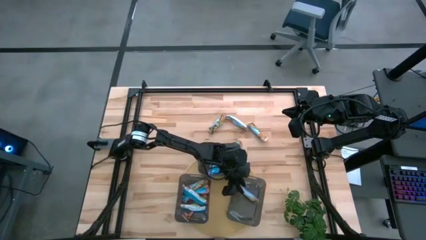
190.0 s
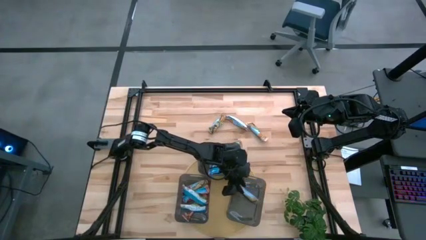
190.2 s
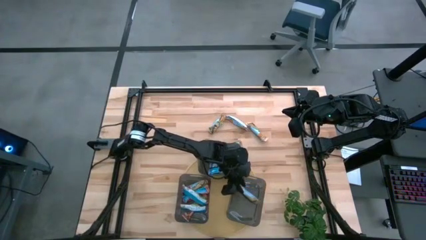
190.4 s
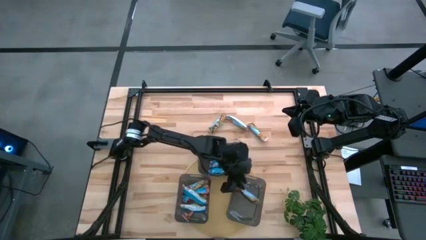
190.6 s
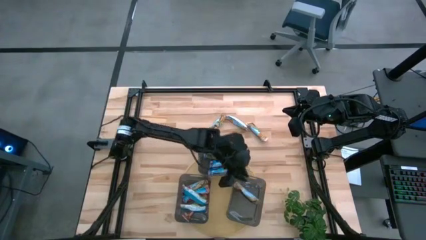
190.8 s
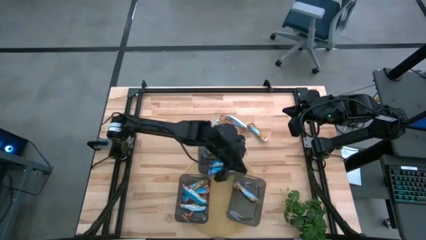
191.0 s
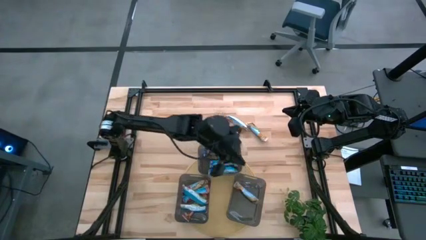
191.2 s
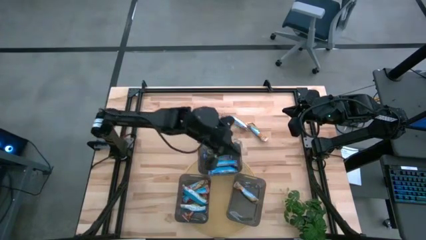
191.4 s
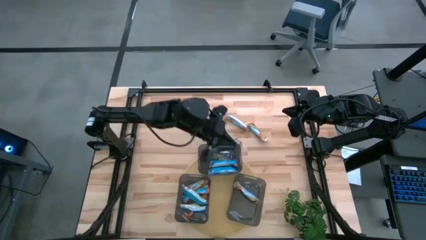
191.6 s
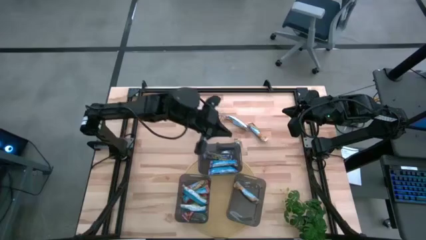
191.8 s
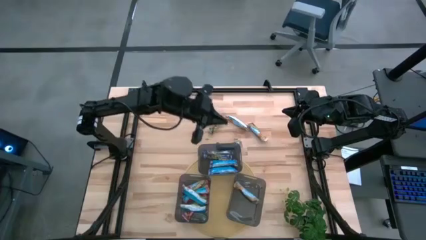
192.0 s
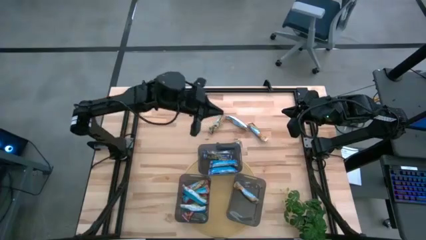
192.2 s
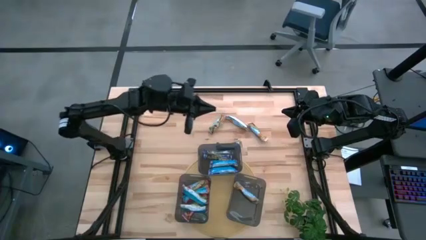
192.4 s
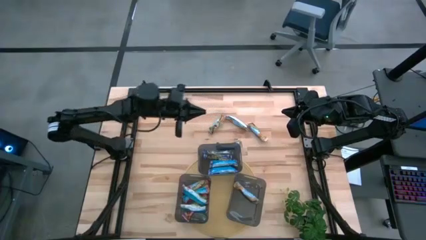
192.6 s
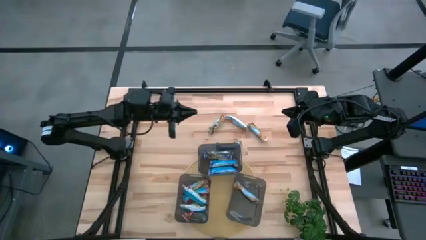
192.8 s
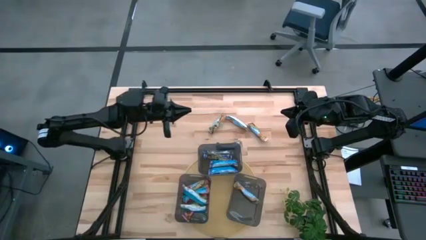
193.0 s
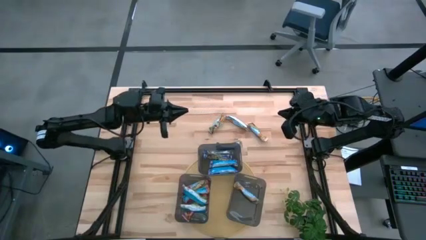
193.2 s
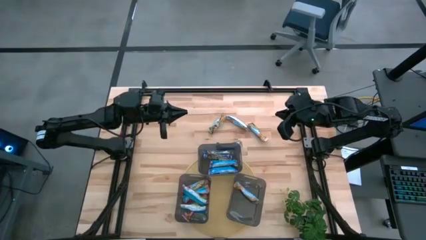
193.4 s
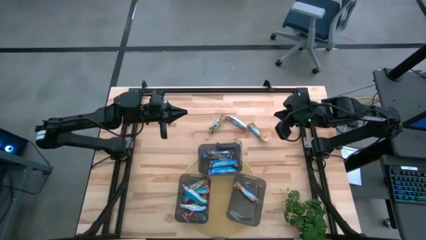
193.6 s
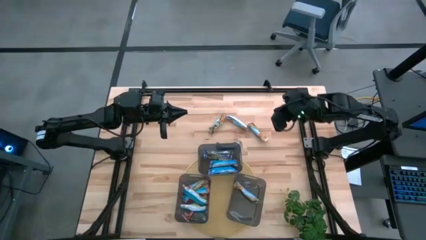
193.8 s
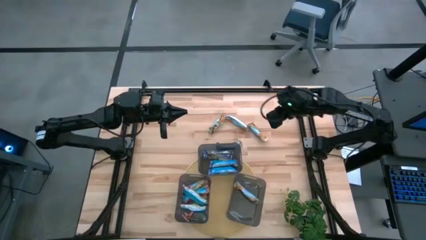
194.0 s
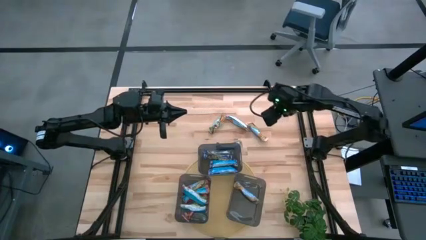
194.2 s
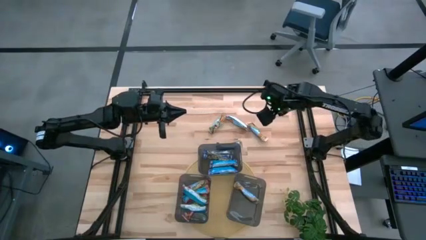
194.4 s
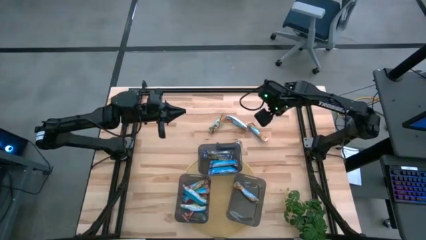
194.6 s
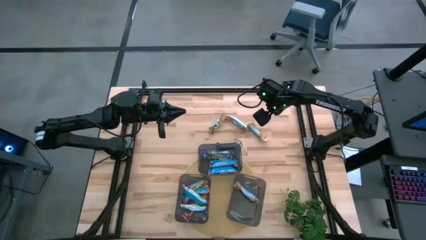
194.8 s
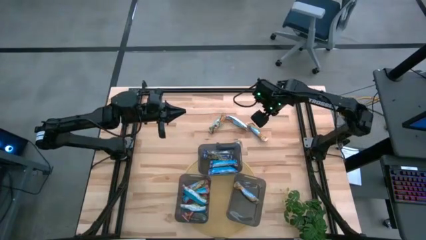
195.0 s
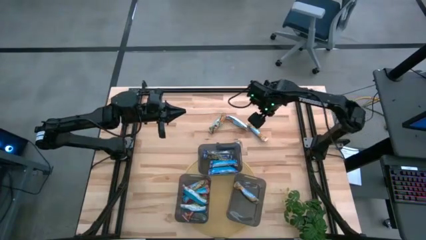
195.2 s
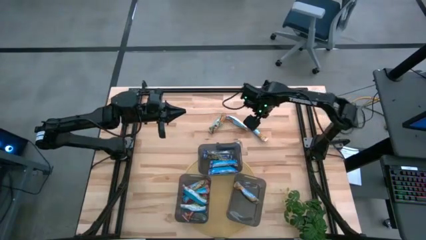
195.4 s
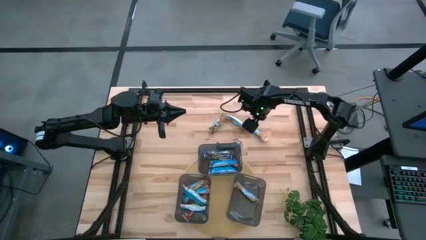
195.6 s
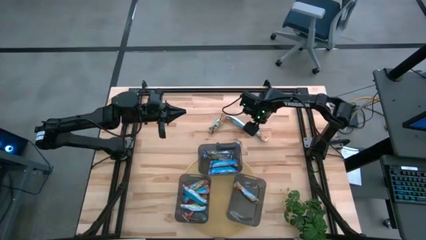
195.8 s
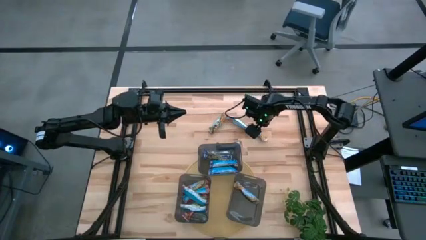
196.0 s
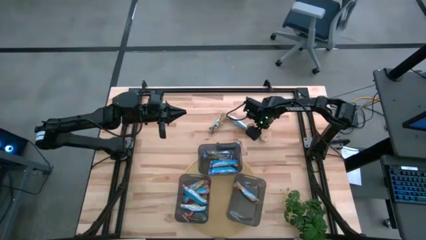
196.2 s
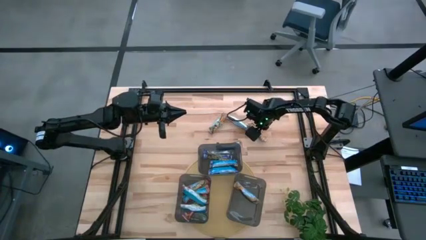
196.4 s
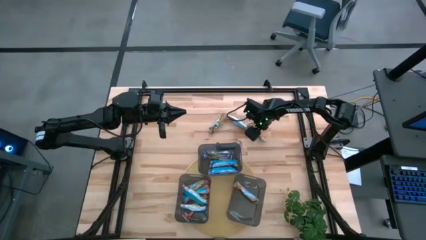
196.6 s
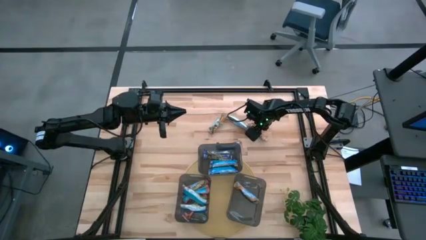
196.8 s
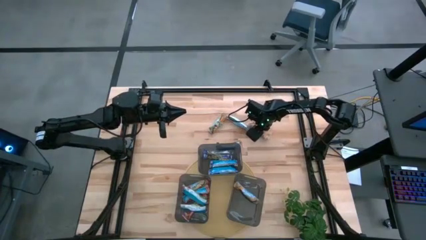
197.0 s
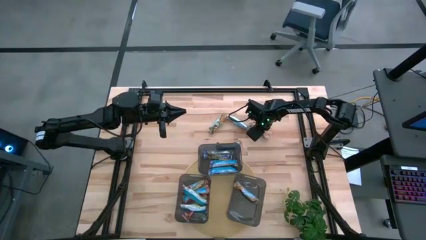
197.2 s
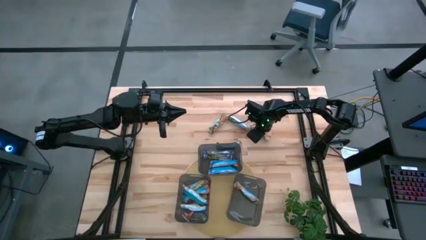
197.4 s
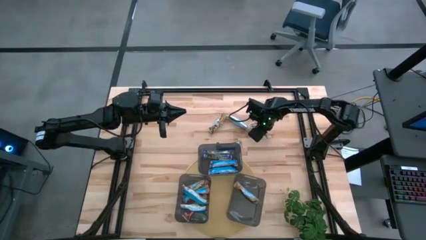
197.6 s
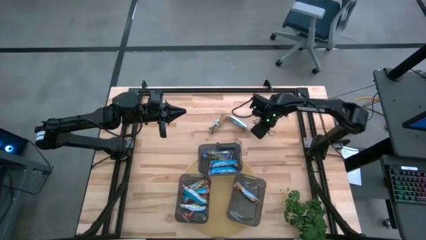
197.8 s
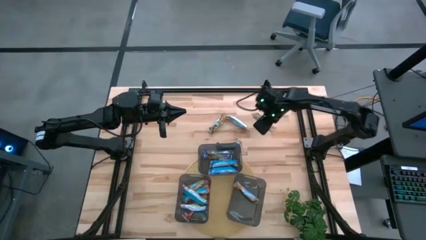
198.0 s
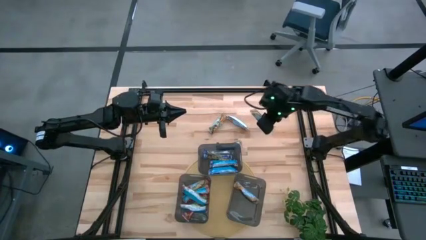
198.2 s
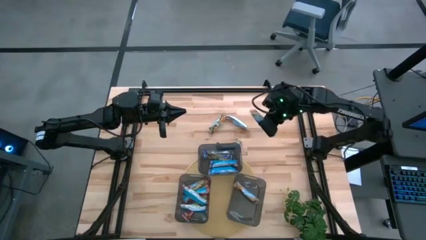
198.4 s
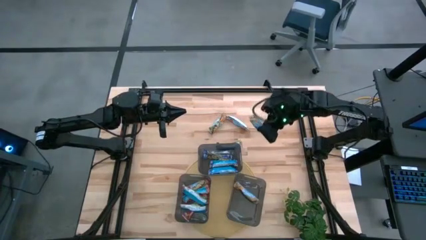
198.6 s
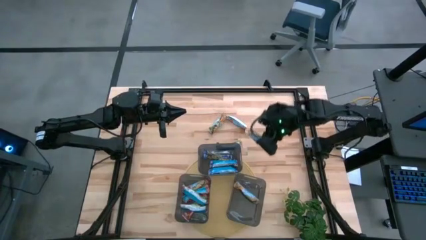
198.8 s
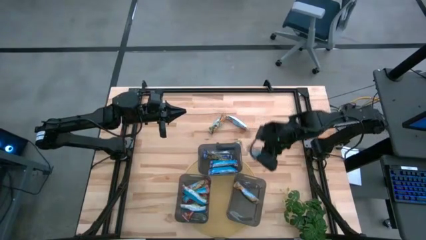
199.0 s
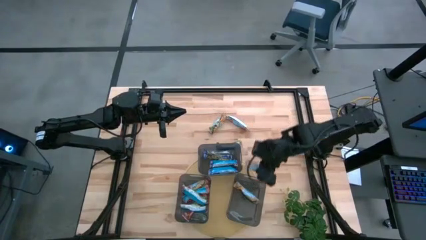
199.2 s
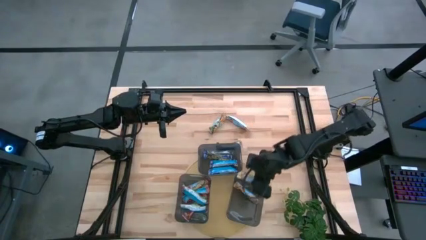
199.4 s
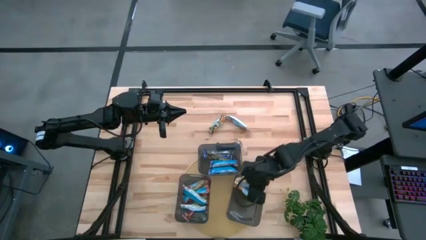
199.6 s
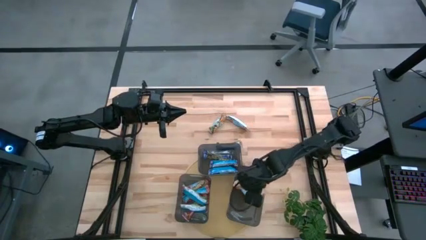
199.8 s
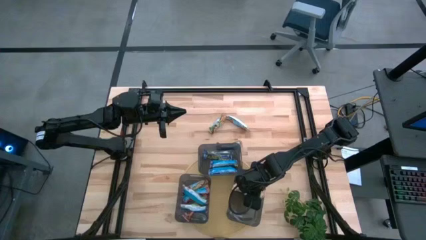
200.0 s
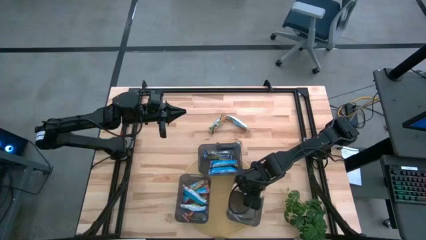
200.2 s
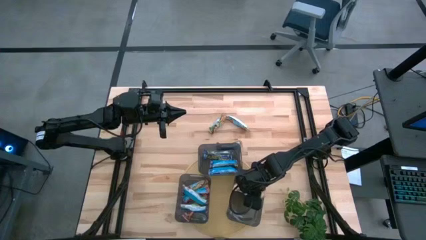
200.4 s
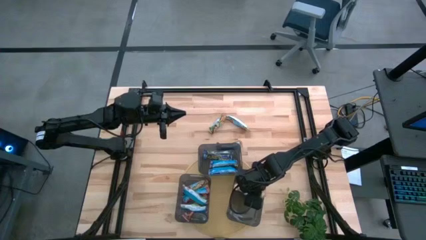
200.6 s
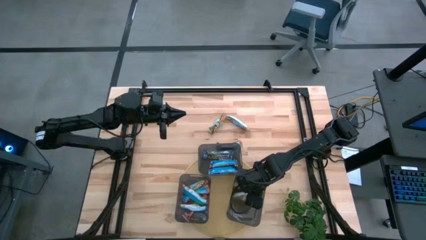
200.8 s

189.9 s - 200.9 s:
Task: Pick and place Granola Bars by type
Put the yellow granola bar into the bottom right black bin

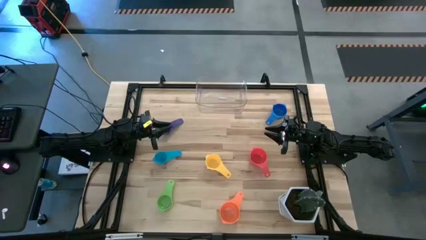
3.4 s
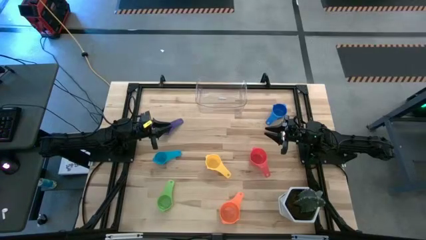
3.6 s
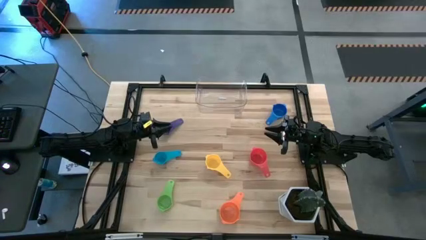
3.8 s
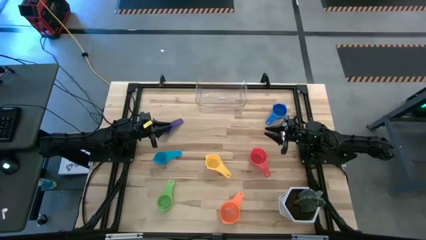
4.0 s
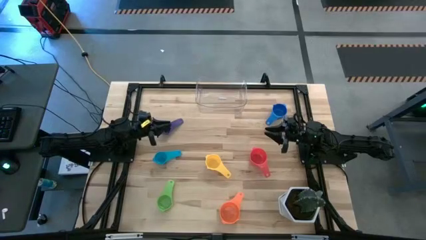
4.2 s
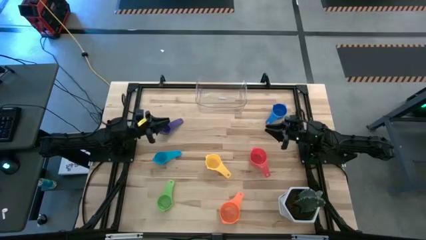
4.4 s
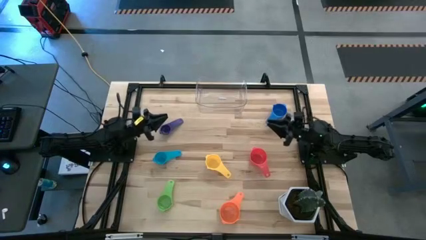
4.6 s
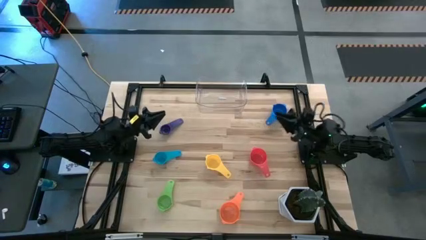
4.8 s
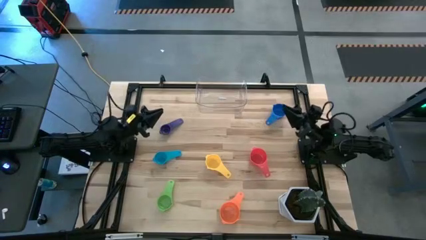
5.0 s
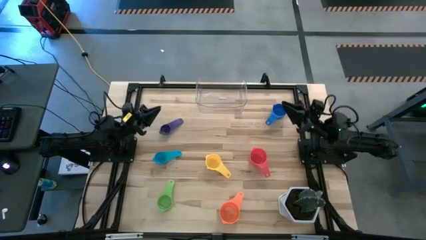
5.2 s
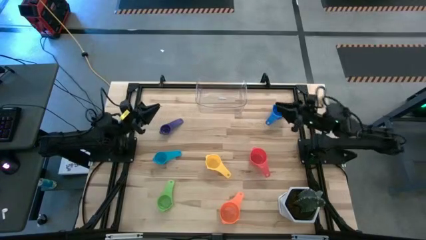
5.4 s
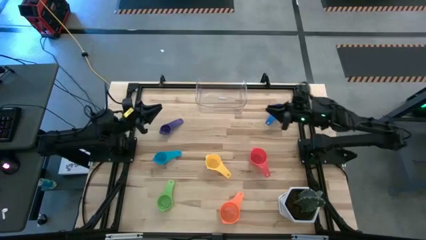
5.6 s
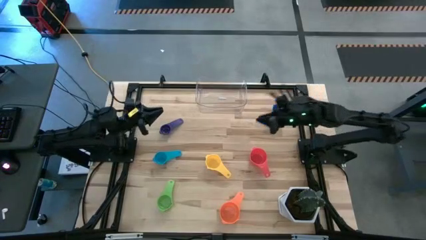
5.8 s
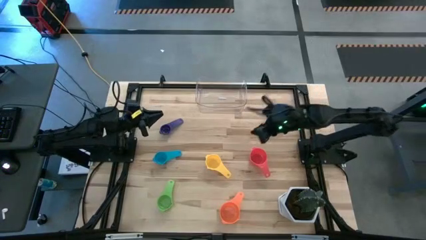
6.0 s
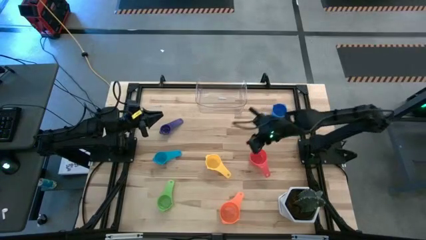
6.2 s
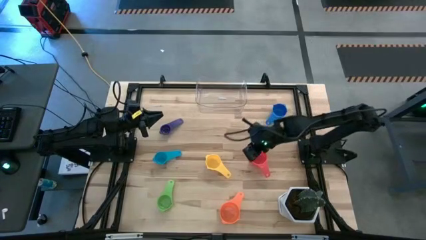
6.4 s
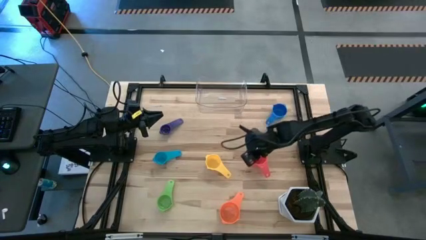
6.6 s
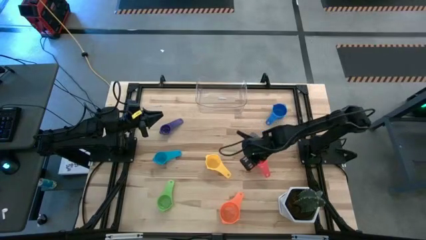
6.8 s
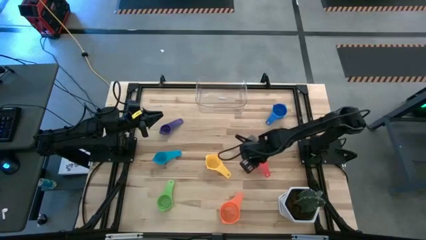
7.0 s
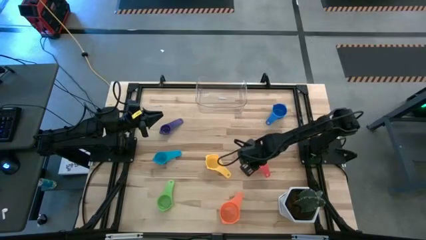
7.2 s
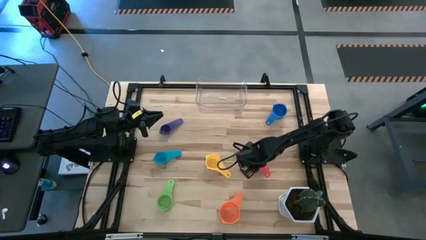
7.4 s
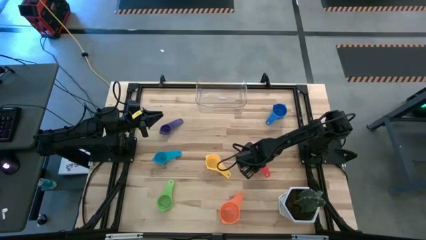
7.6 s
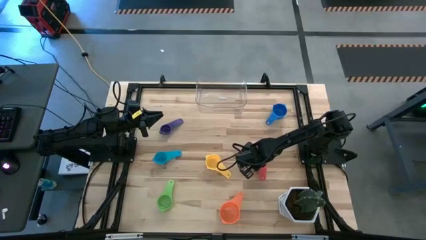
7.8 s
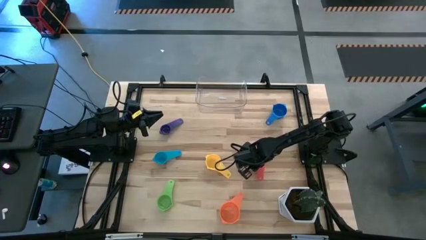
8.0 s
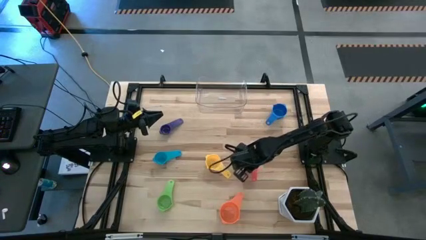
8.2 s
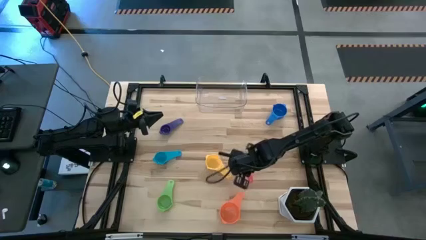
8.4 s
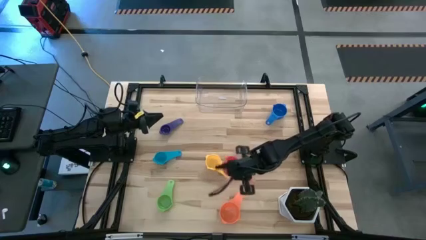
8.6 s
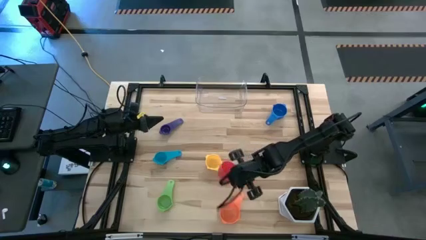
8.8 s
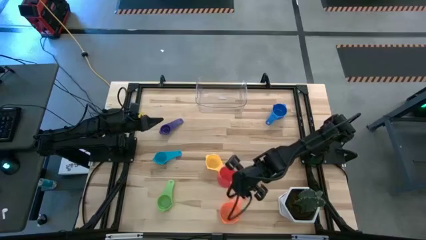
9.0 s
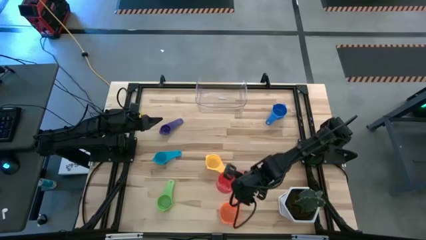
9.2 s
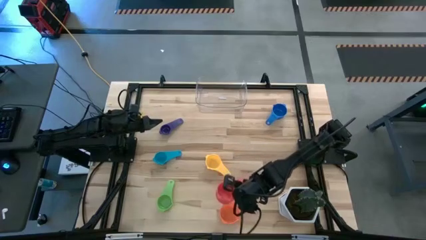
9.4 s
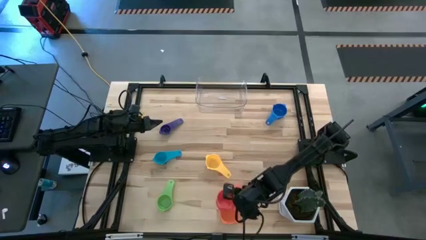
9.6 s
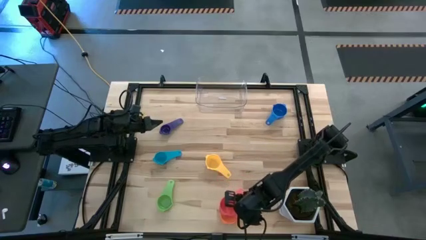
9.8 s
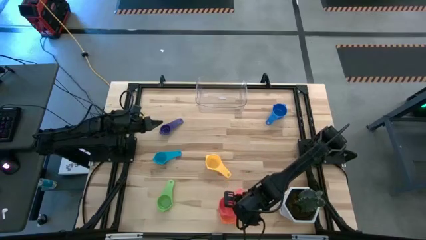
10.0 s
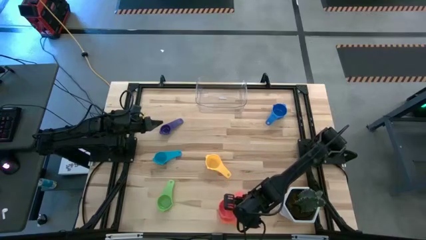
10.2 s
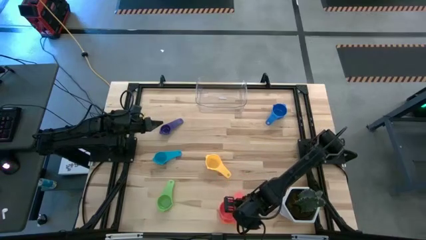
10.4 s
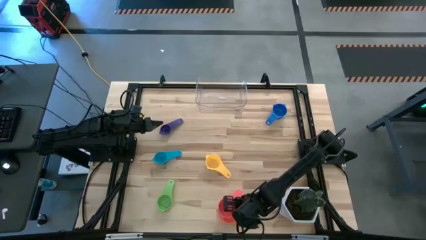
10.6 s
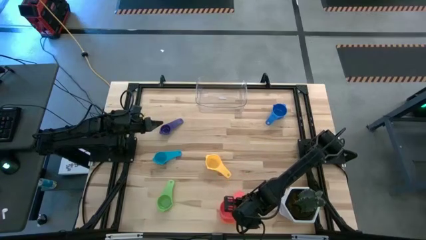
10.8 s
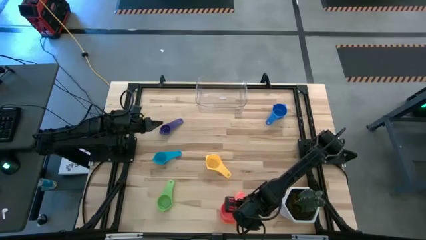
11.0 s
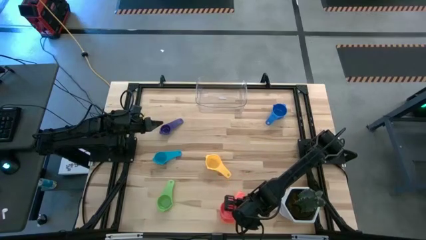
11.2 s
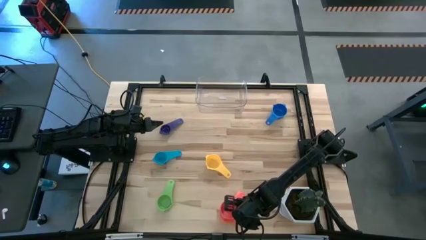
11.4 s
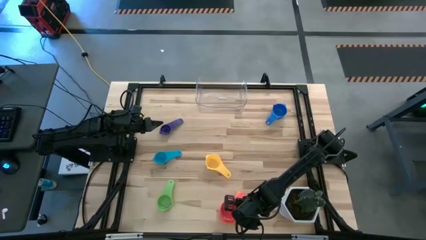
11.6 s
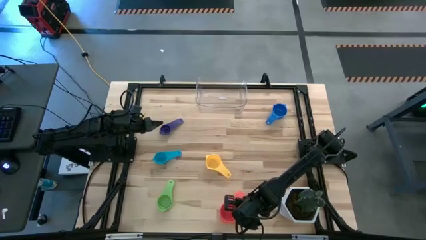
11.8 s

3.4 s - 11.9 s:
Task: Nest measuring cups in basket
Stack the red measuring cup on the orange measuring cup
